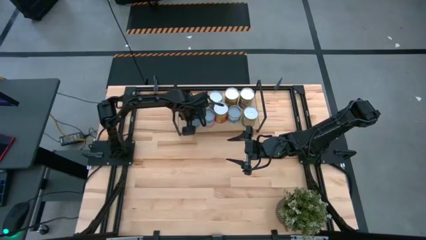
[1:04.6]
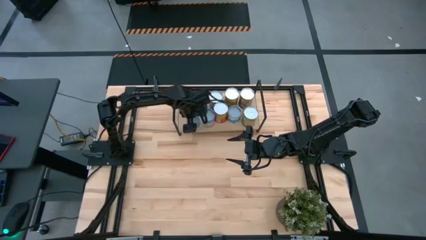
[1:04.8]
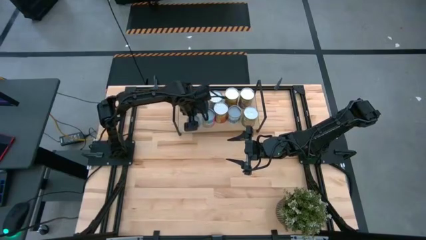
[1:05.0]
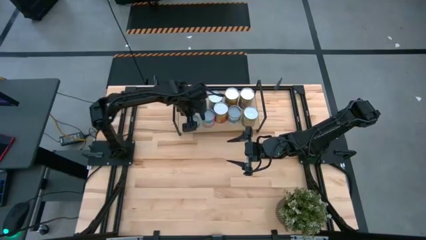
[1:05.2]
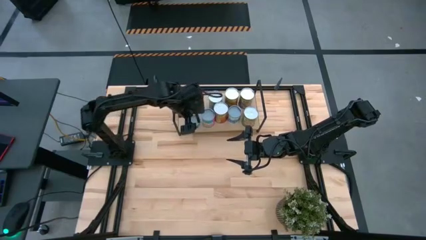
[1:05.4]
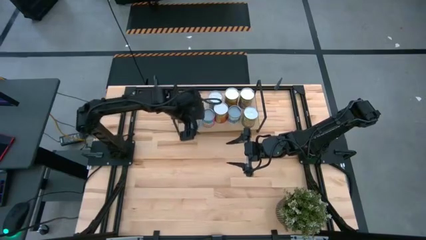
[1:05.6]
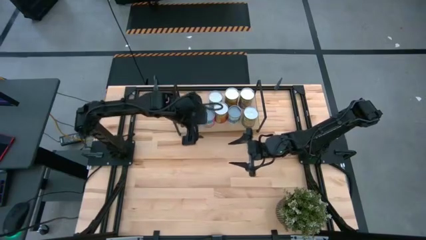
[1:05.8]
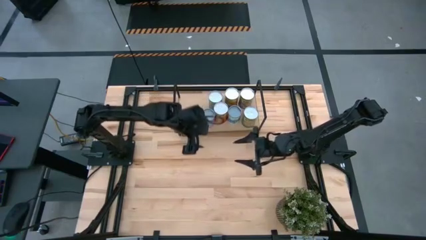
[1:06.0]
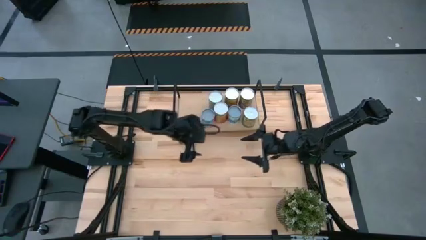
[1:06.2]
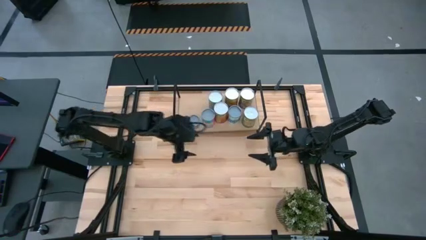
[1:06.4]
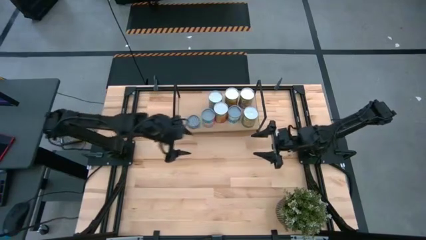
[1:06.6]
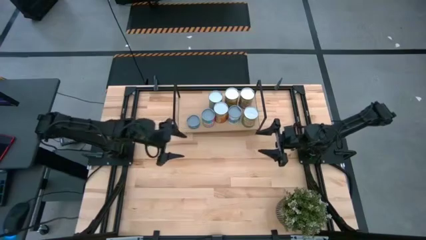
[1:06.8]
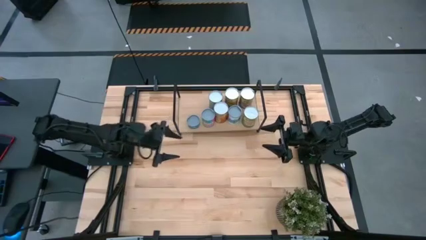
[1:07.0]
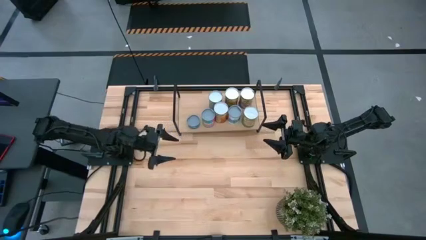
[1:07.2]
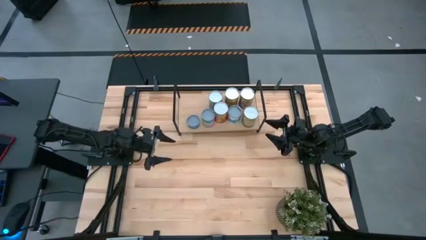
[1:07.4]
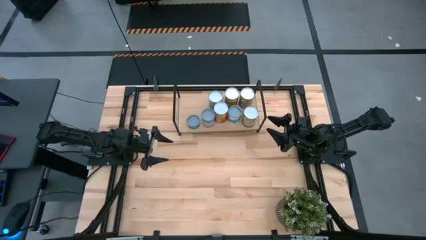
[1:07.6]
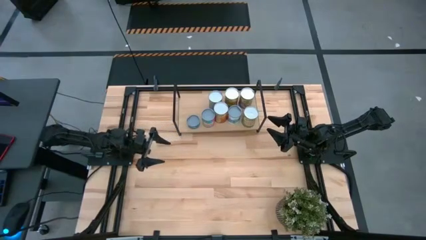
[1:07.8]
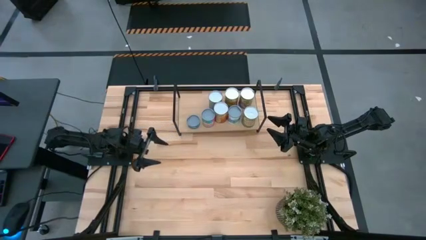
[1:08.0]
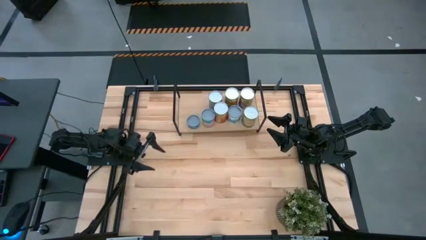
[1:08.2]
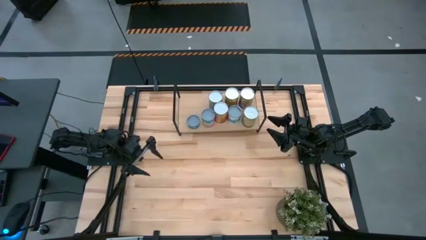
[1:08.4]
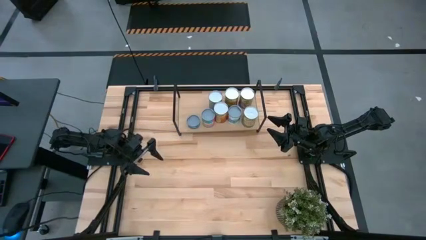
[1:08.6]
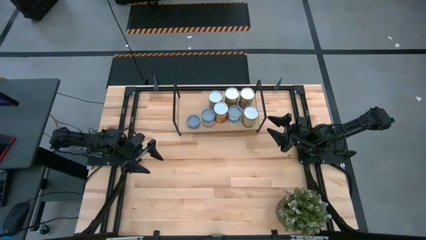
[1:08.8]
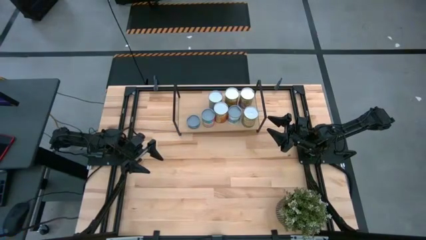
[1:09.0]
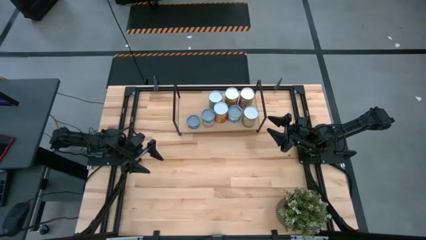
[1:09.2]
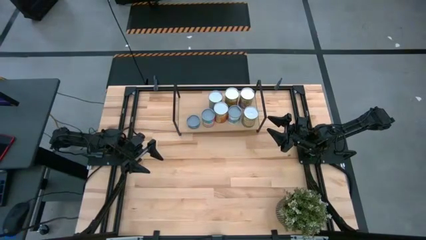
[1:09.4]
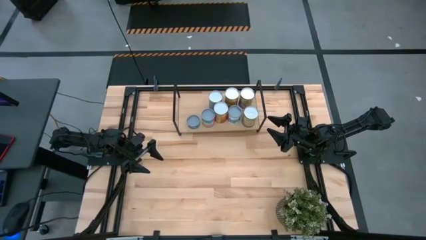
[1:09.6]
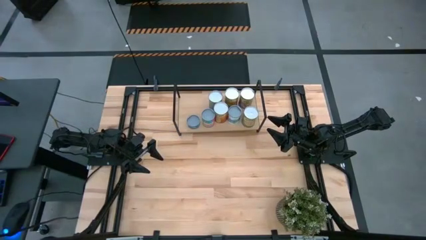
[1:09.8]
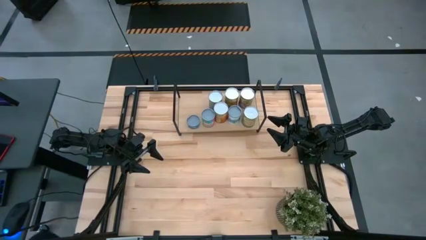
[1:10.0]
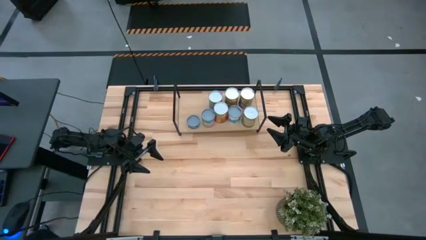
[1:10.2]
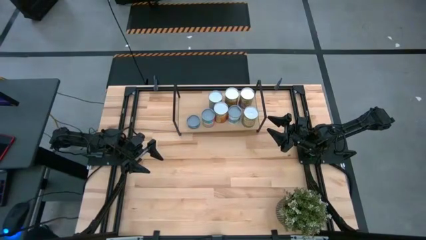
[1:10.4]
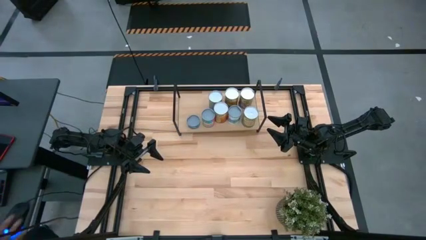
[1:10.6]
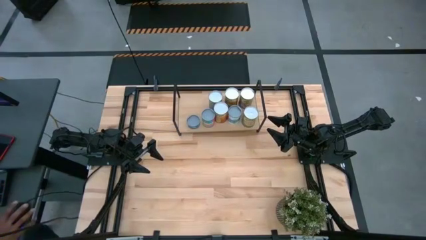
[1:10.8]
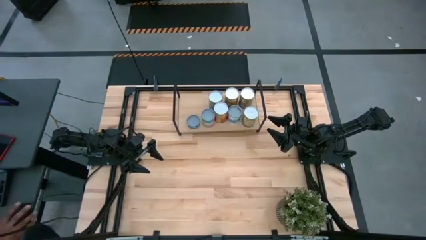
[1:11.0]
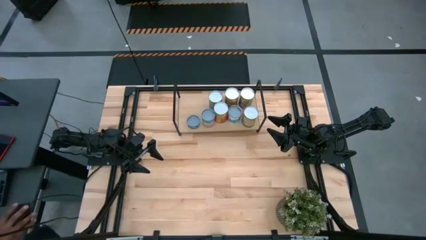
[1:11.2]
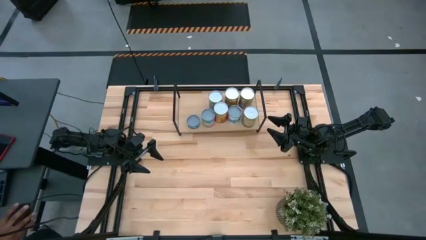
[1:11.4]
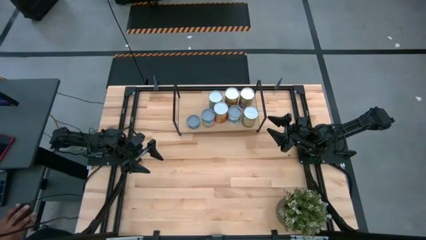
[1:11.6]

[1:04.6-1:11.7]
Task: Pick and place cans onto a shelf
Return to Home Position

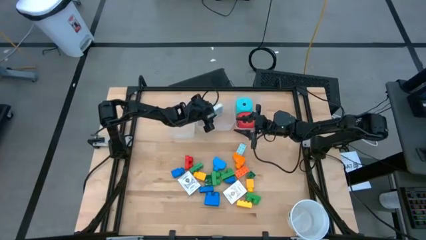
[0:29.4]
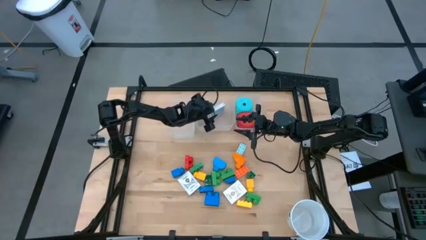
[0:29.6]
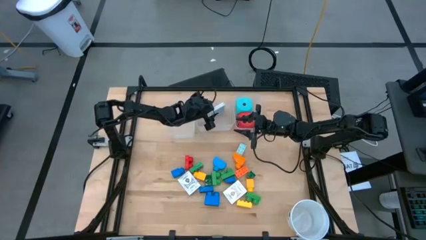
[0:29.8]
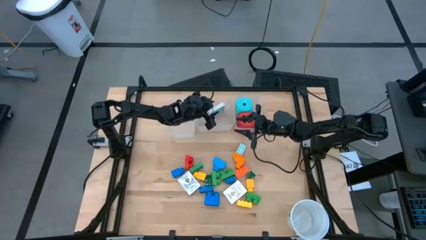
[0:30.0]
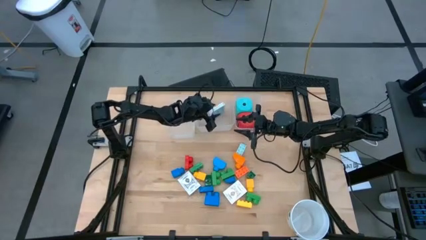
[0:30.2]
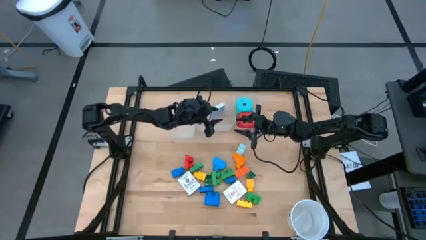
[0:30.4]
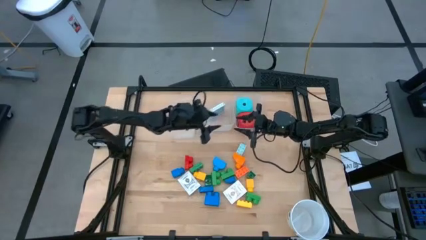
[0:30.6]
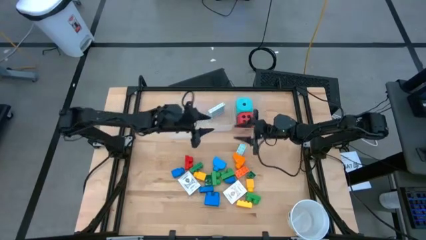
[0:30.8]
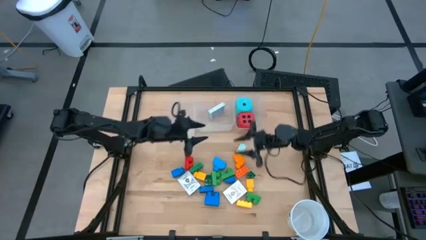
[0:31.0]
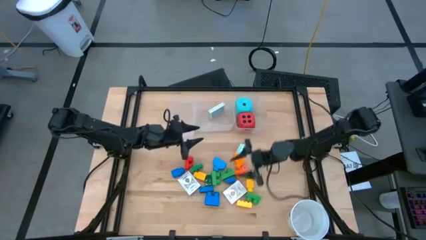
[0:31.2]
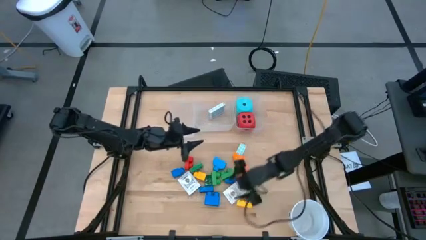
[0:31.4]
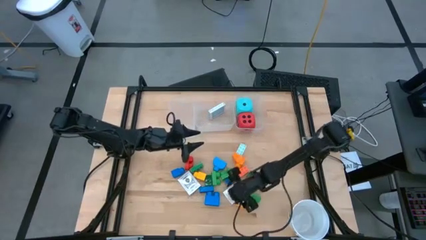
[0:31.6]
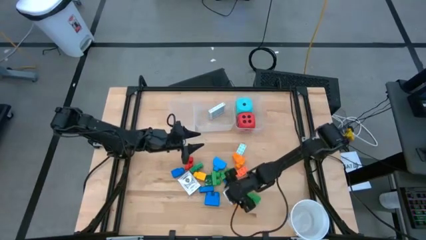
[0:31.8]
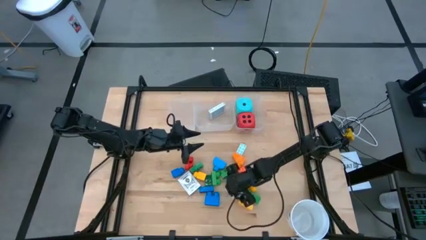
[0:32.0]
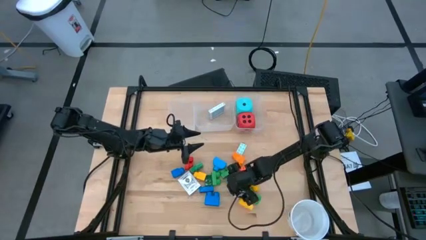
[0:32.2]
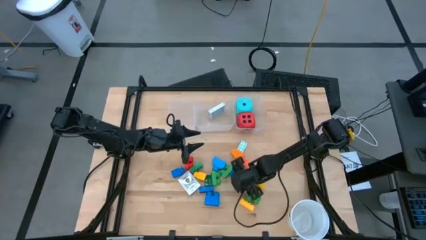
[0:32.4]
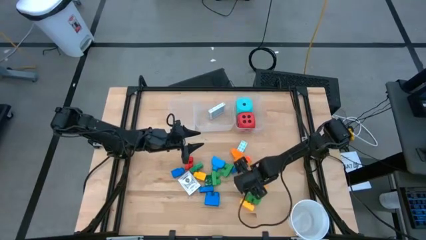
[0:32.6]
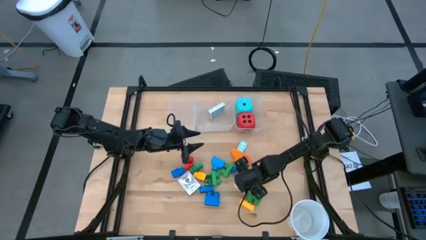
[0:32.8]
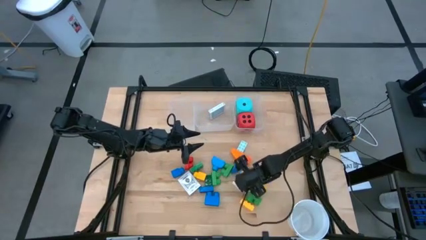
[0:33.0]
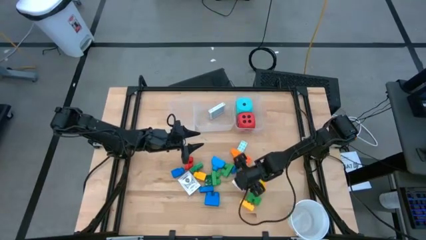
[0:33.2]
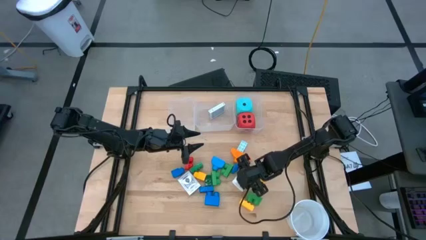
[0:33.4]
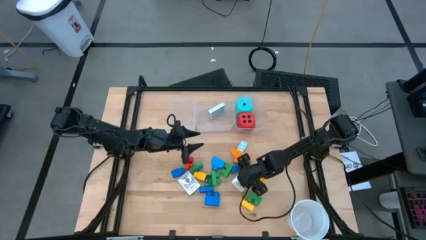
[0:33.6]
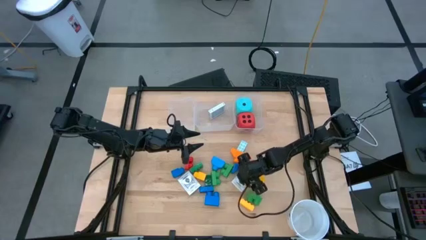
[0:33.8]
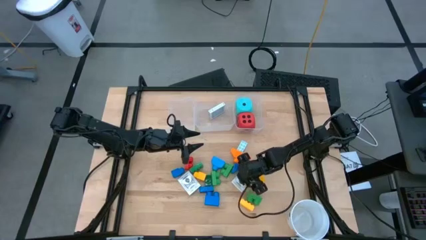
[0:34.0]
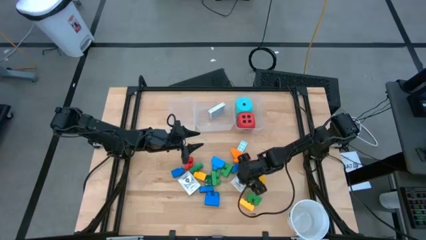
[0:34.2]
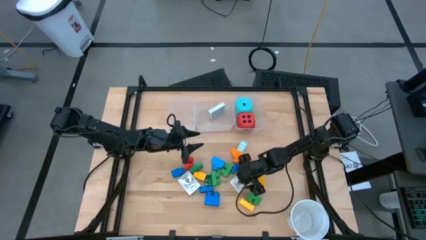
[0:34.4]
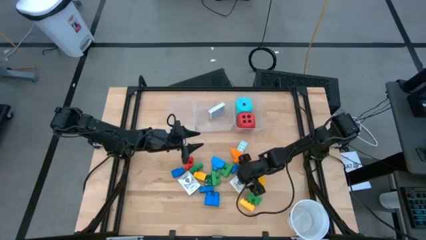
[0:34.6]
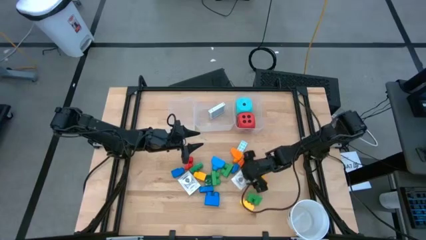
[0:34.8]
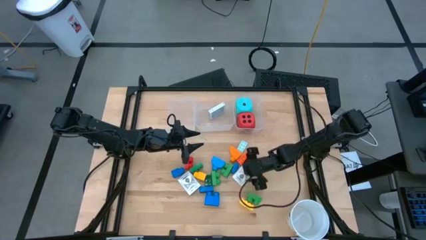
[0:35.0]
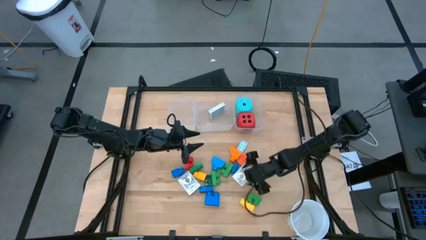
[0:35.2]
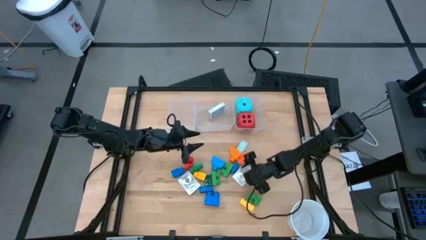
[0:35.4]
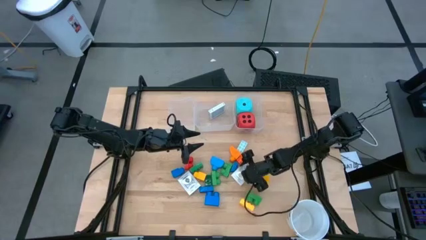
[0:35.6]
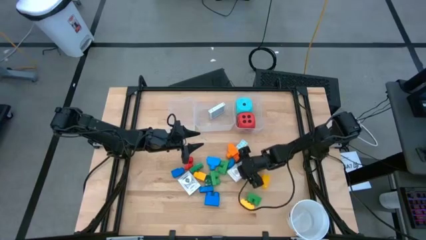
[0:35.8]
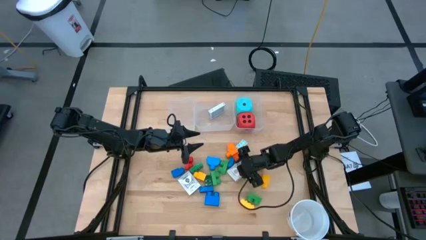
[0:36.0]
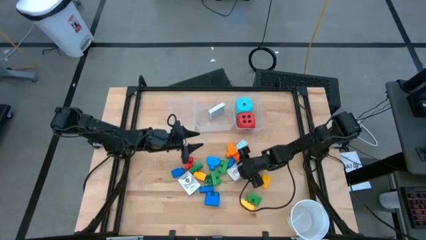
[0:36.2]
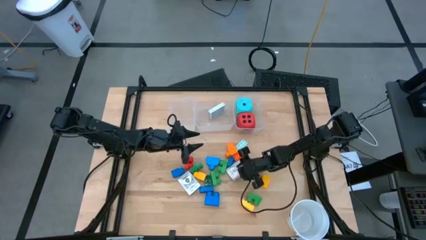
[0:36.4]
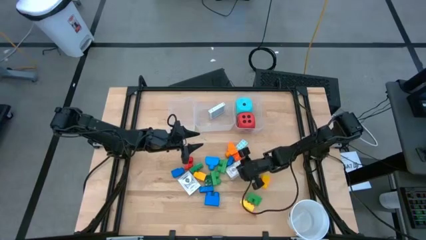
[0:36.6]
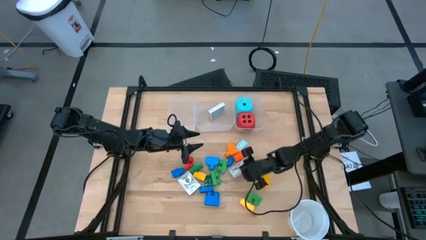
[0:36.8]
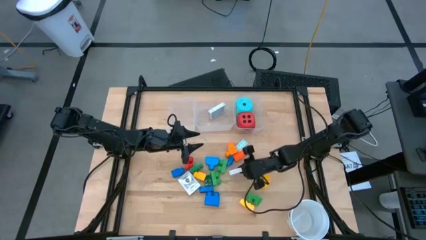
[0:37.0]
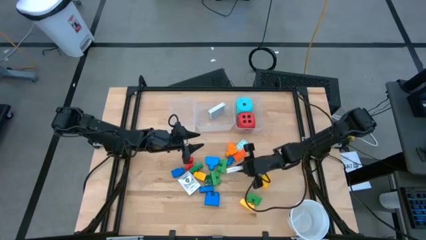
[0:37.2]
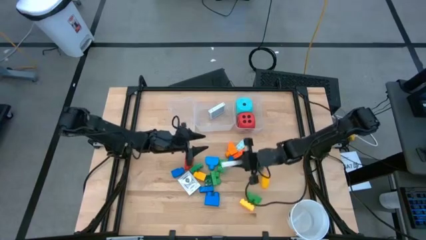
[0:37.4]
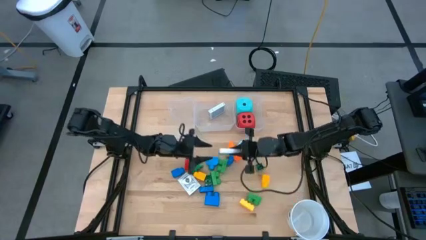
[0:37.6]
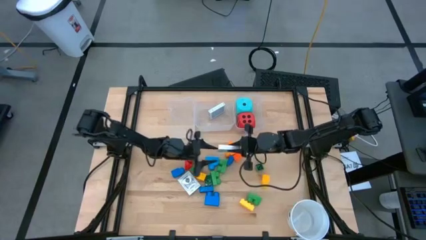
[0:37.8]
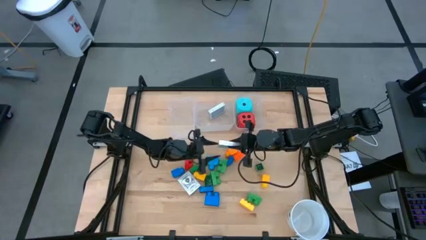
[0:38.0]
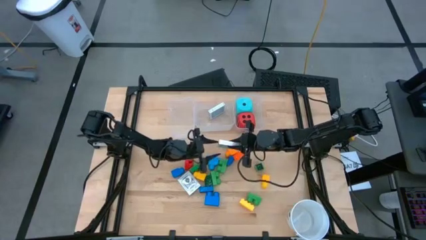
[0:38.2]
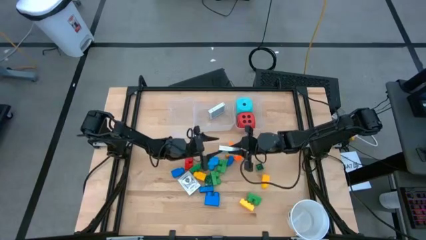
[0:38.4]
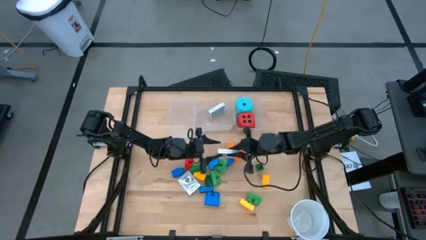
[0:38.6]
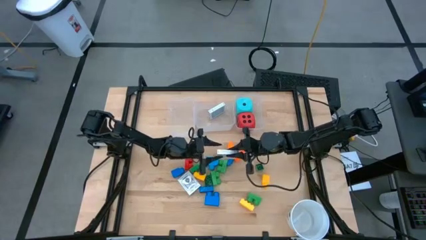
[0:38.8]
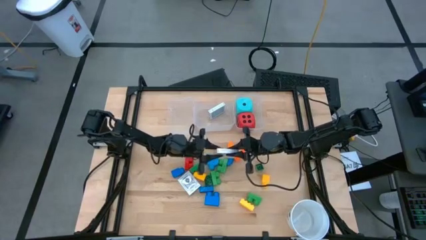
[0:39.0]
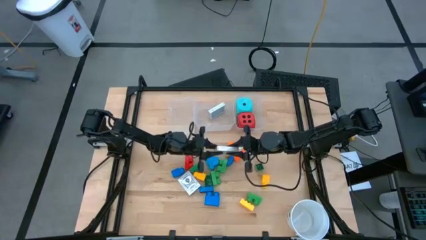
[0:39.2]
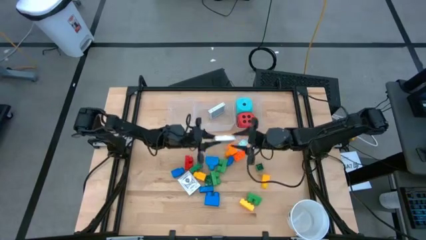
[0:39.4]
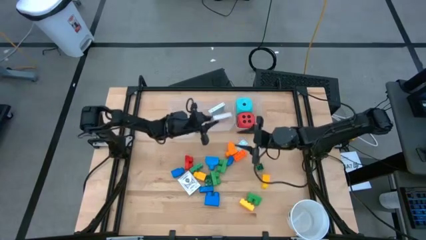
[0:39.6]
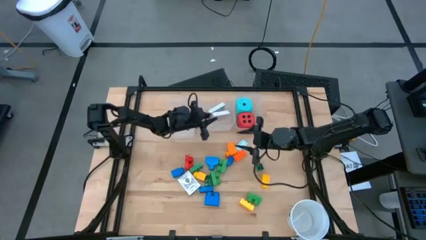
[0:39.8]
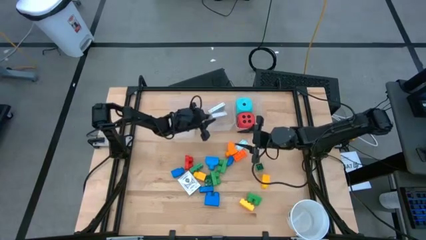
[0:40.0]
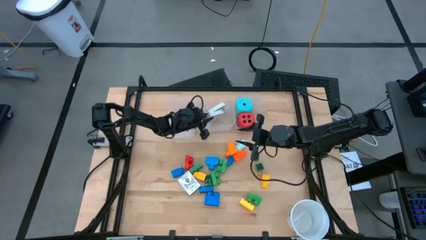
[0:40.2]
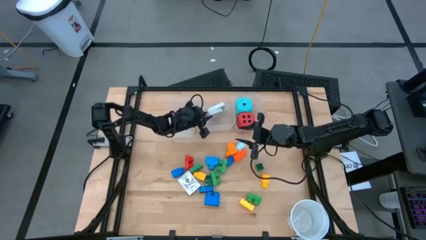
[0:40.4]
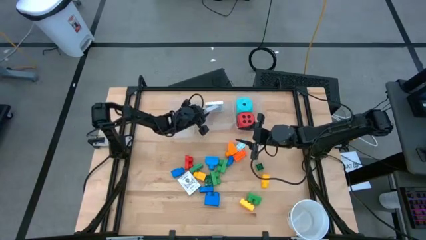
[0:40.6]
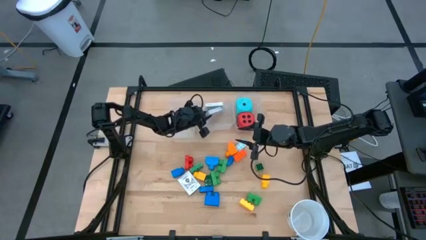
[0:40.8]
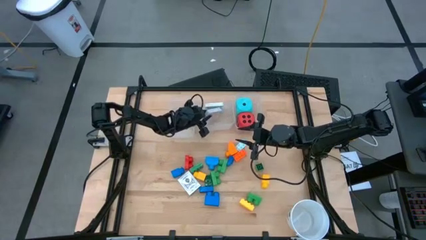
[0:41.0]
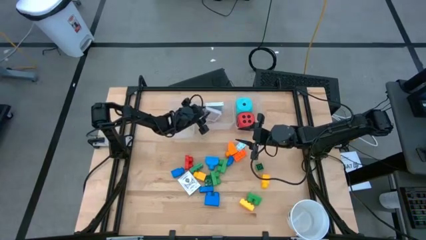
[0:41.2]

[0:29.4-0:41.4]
Task: Pick & Place Toys
Put the brown deck of cards into the middle transparent bin
